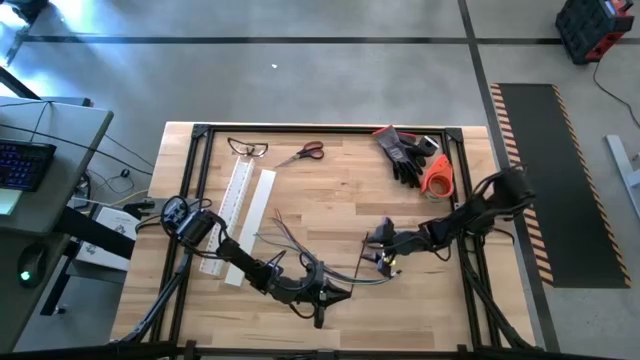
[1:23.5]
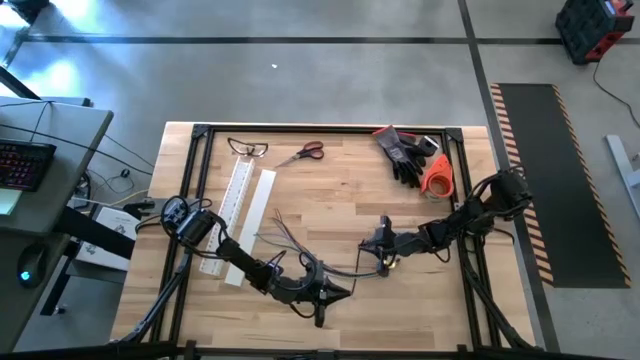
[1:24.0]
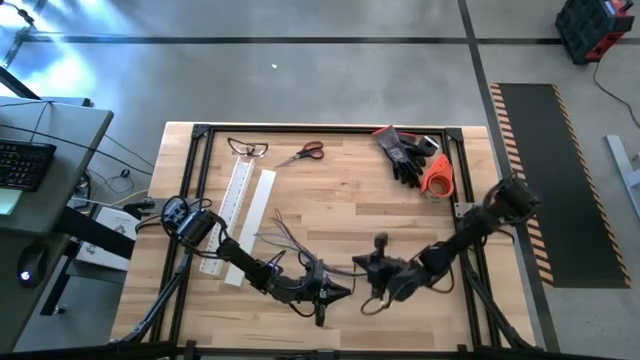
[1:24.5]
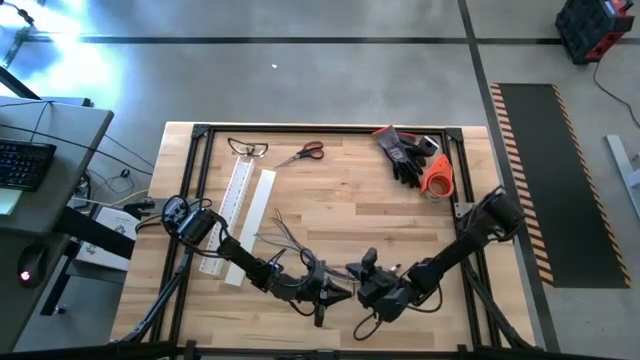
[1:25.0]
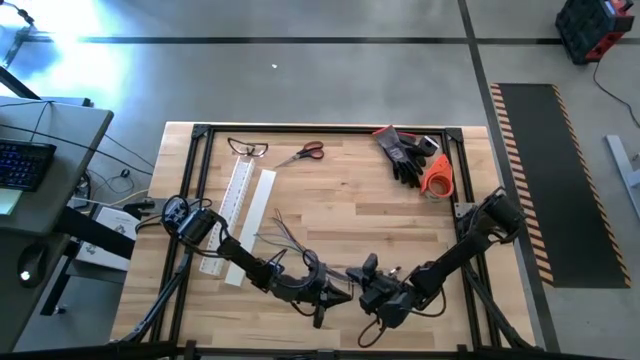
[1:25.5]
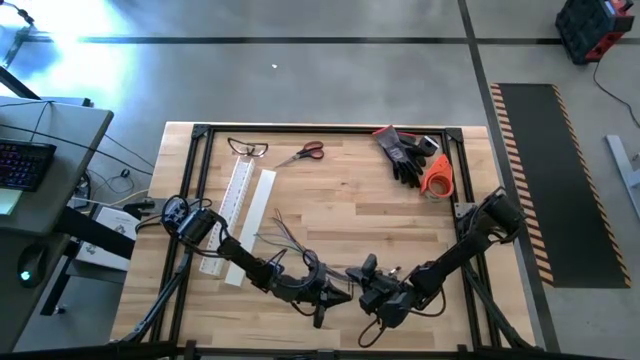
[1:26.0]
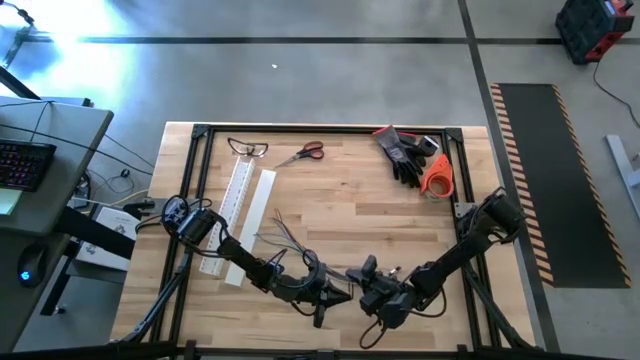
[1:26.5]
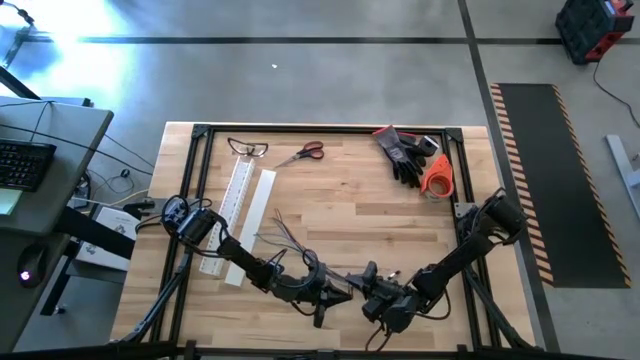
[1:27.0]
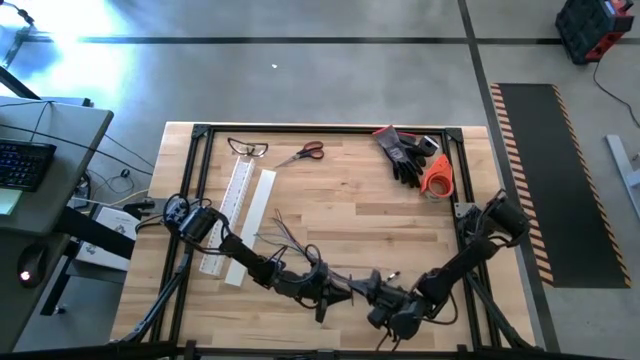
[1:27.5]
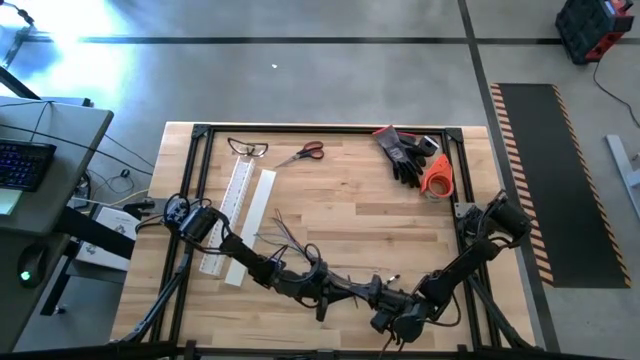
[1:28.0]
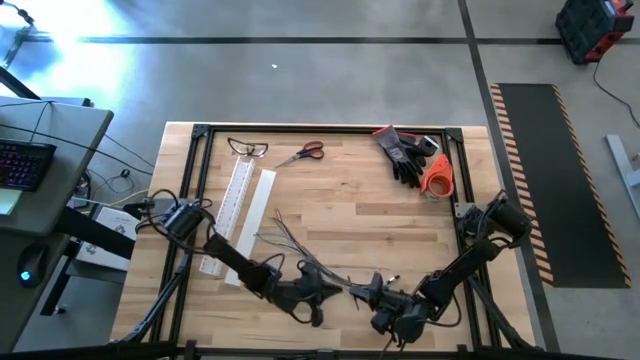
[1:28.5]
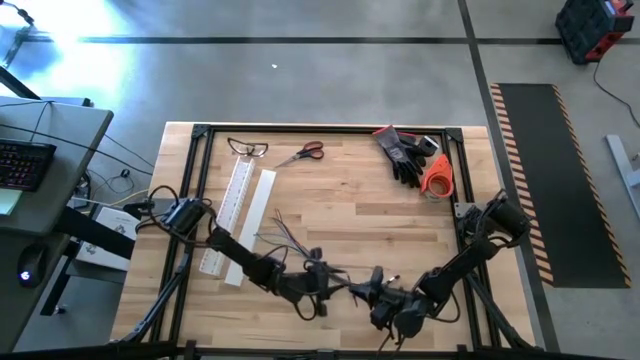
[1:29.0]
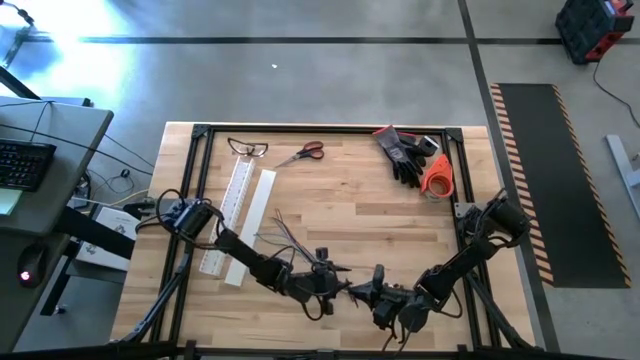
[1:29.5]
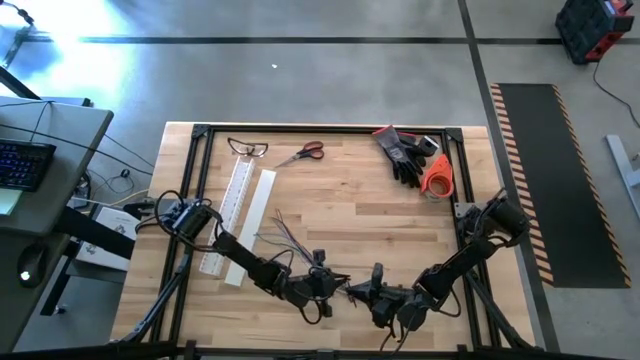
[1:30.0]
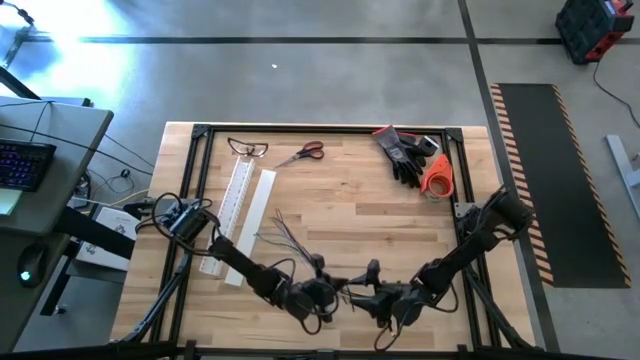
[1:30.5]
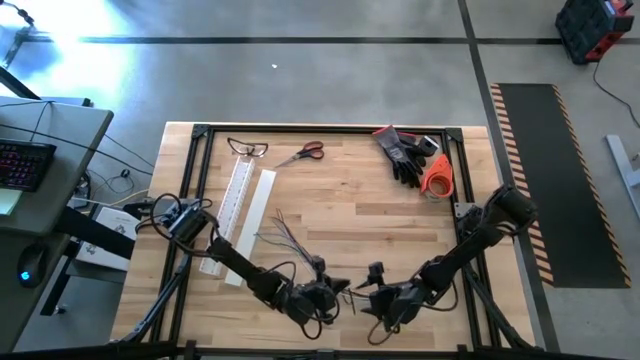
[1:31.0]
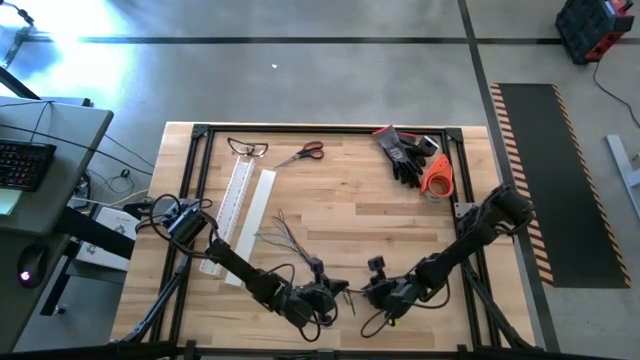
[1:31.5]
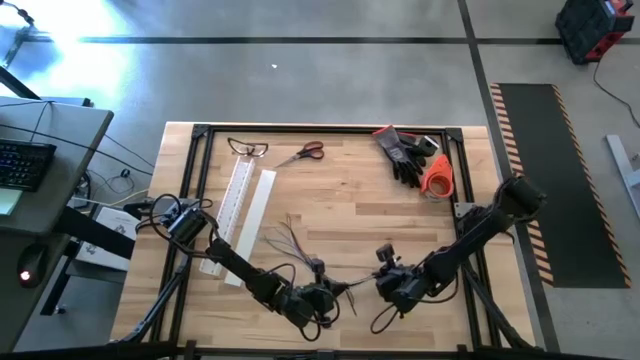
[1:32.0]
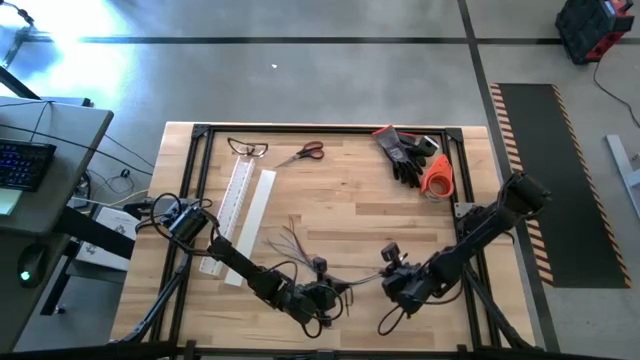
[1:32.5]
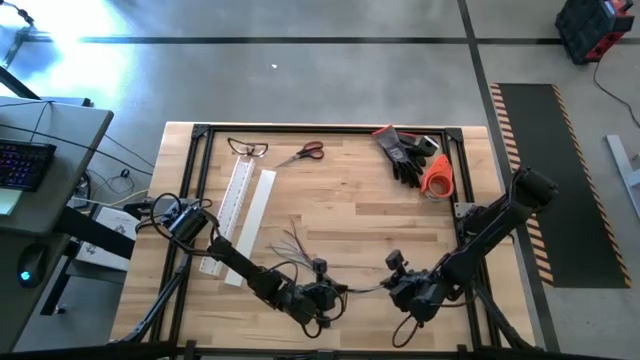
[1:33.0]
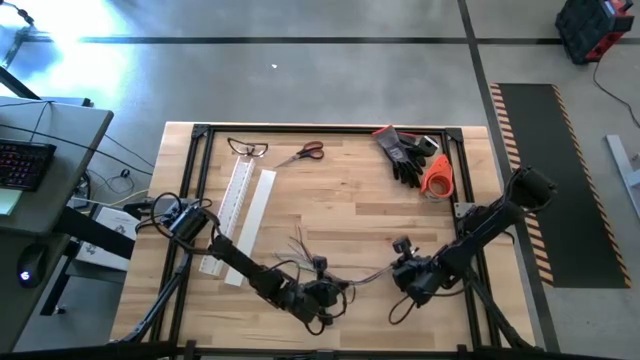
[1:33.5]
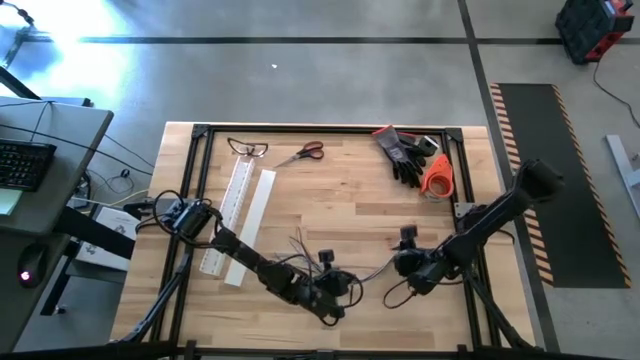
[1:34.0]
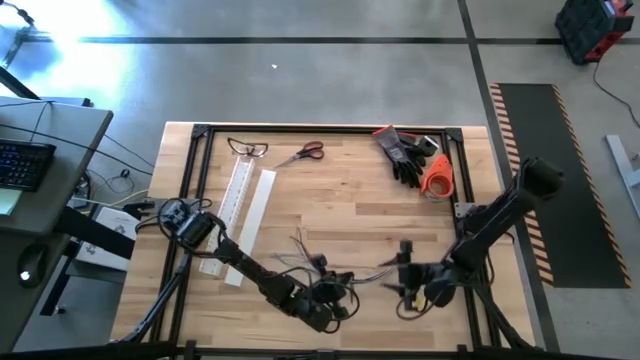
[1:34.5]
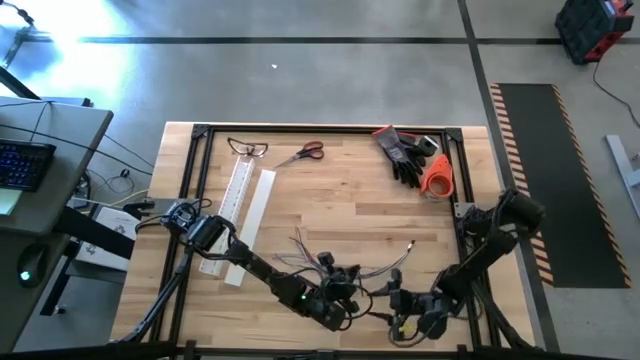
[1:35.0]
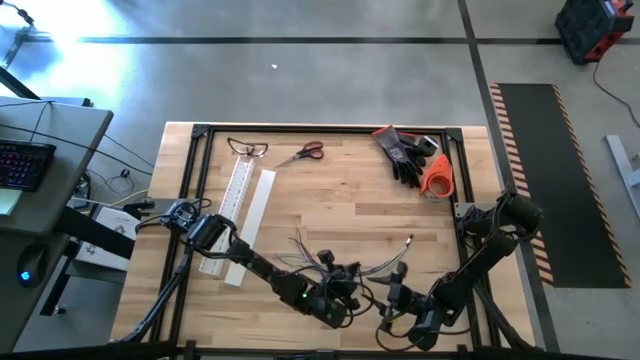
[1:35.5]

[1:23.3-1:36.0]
Task: Ziptie cables
Wrap the black zip tie around the cable

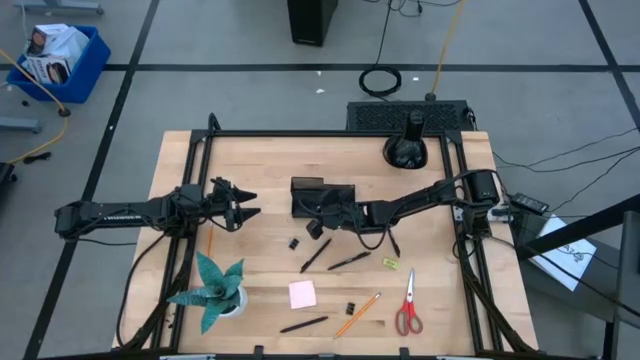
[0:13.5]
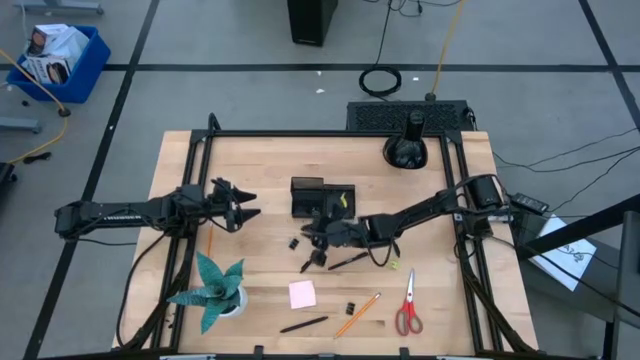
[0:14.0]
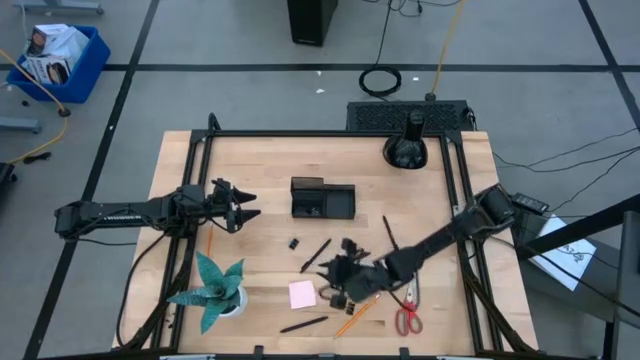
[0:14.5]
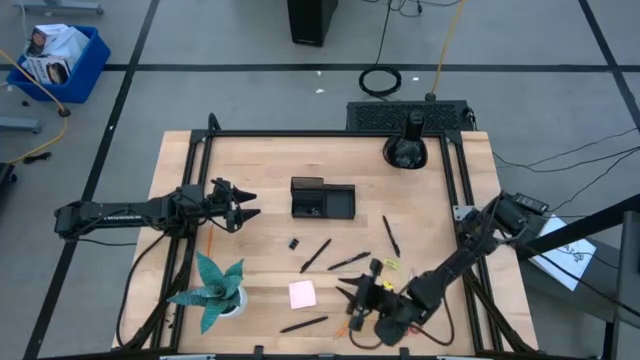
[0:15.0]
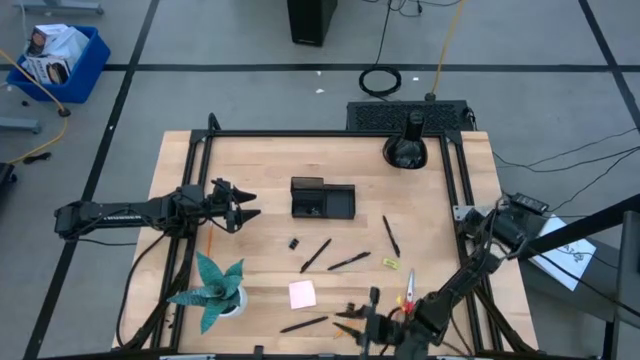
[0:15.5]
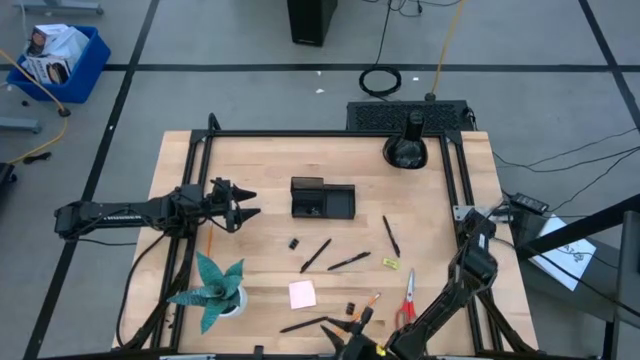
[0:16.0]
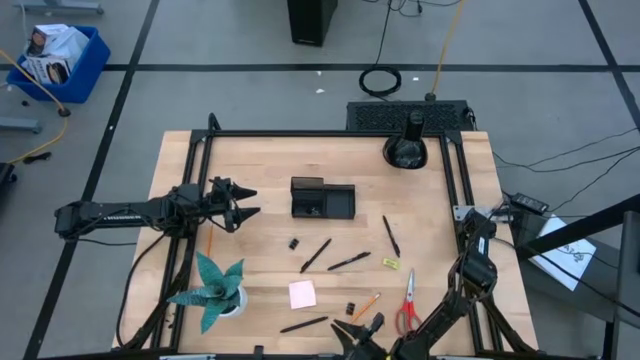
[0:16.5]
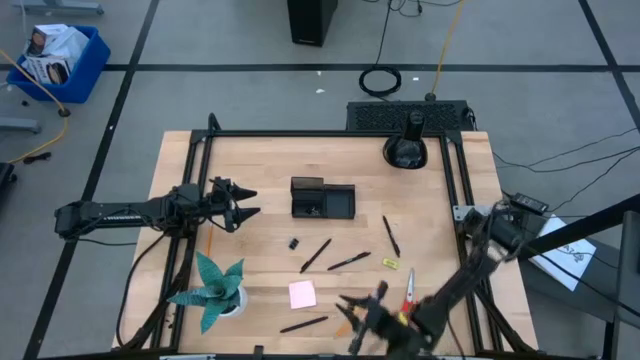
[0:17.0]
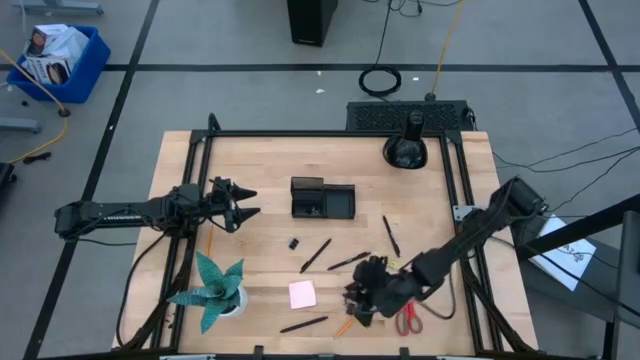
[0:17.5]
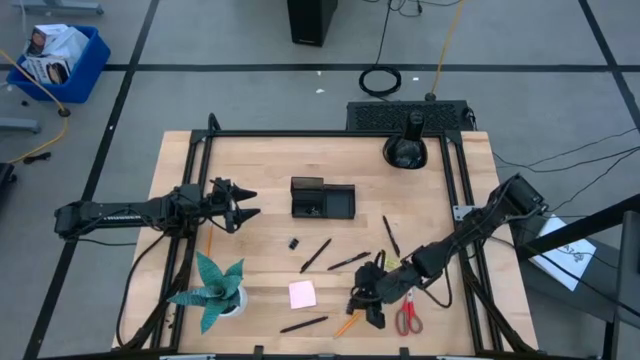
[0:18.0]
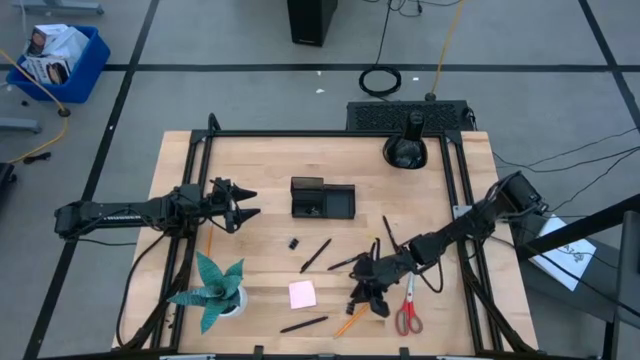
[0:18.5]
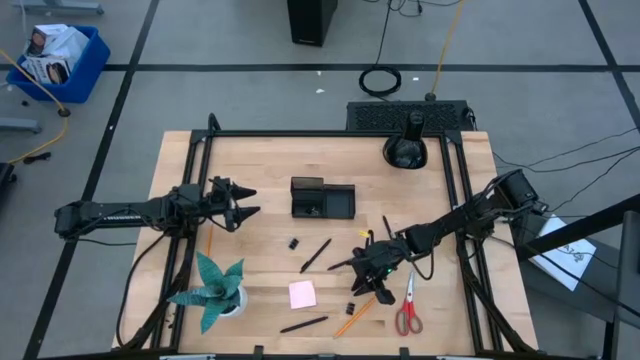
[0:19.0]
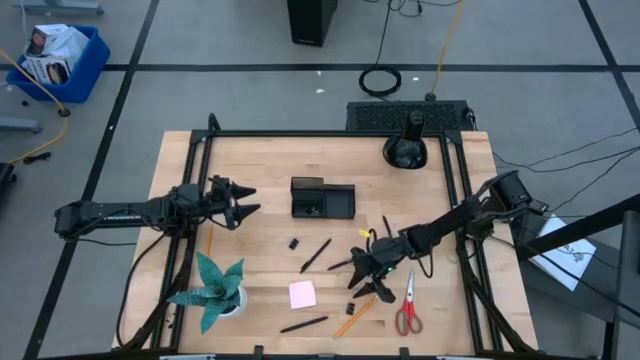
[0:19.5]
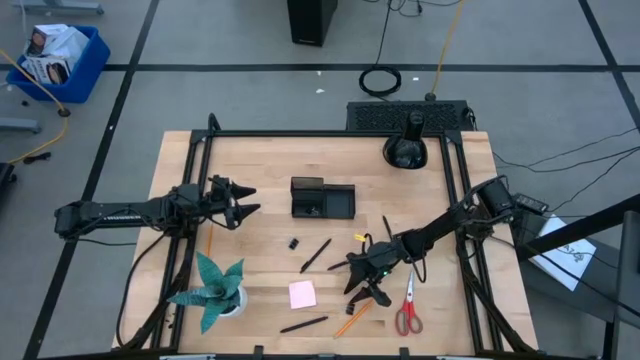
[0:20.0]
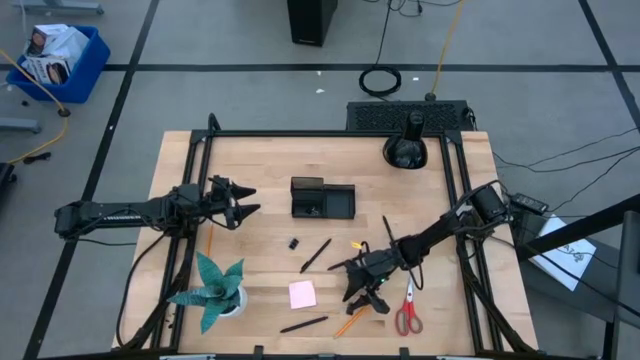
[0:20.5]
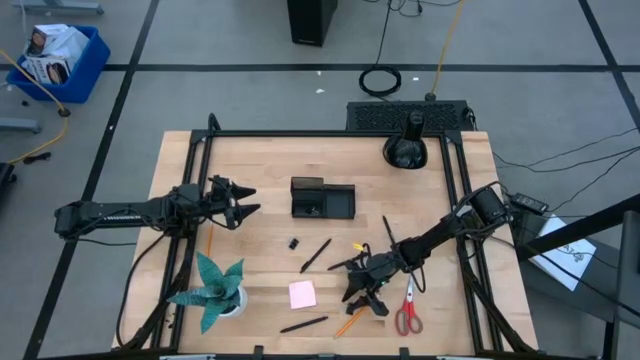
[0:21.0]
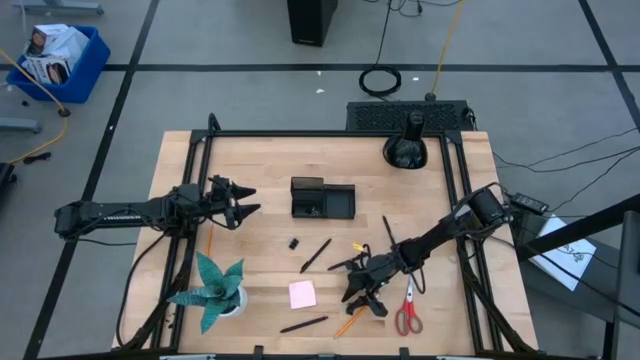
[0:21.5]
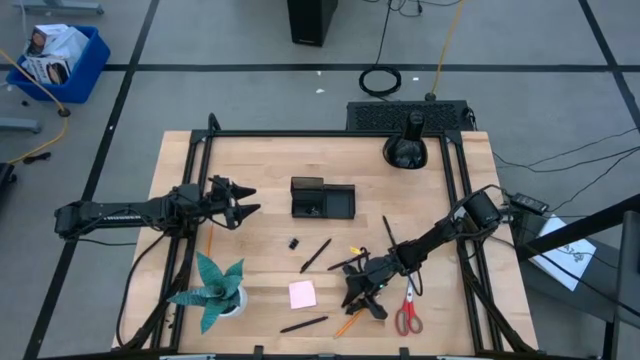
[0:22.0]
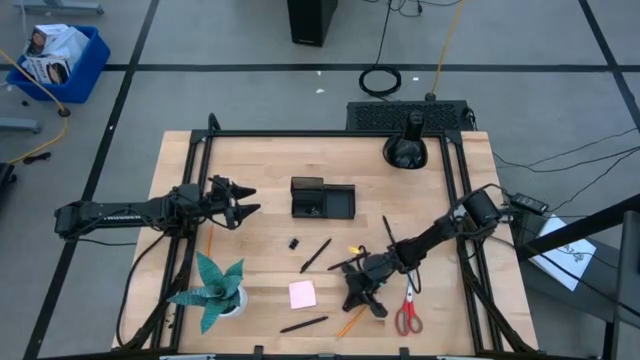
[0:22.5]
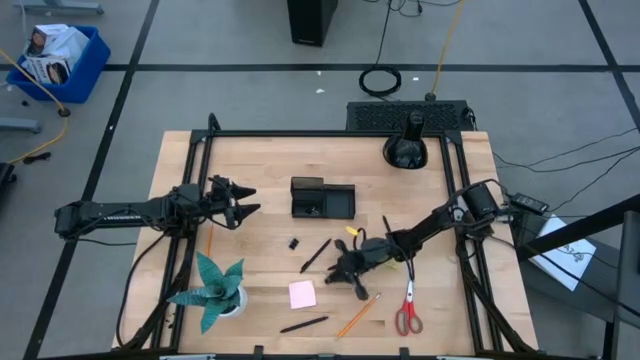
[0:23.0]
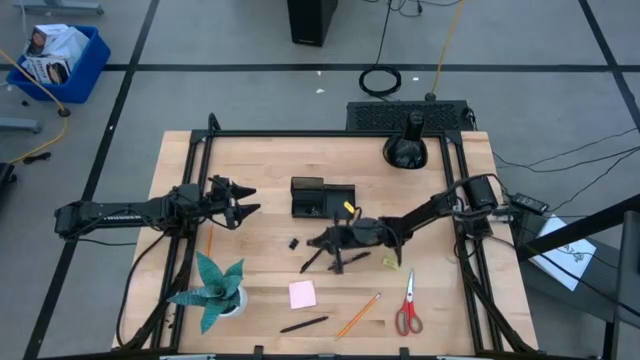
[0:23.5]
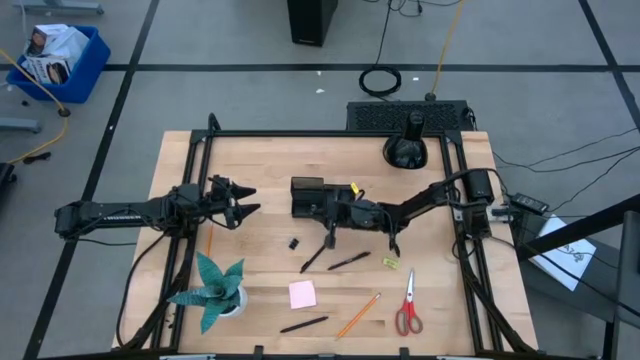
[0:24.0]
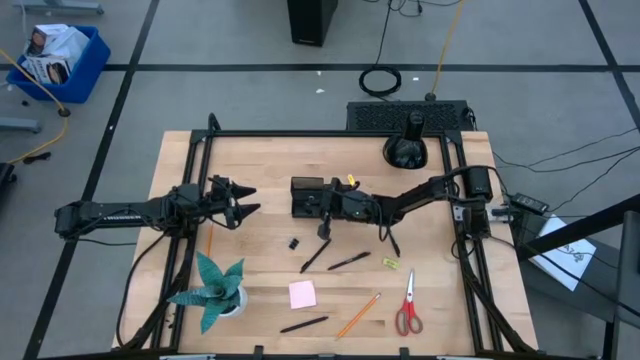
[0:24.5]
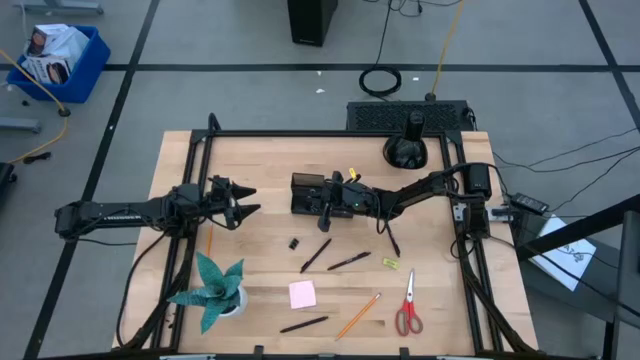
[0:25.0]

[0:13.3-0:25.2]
Task: Pick and place office supplies into organizer
Put the black binder clip into the black desk organizer
